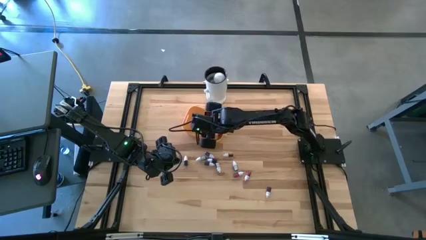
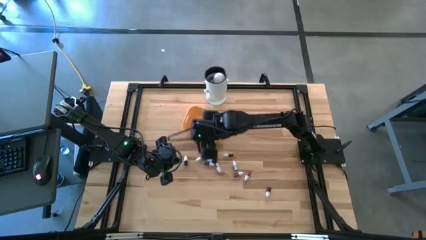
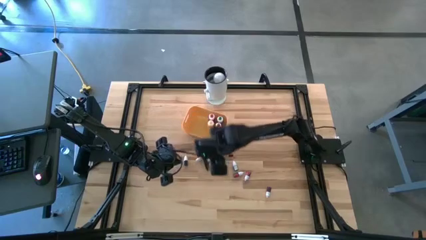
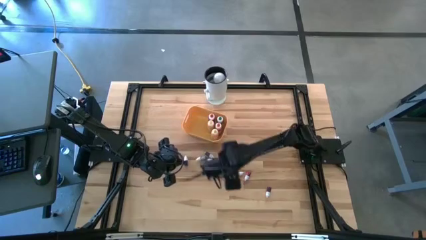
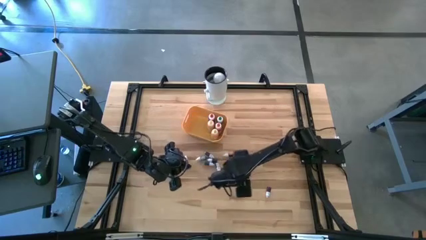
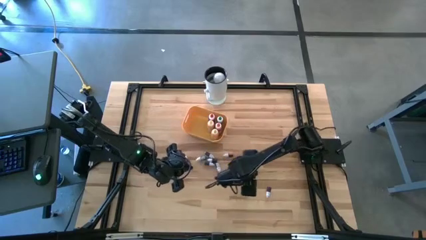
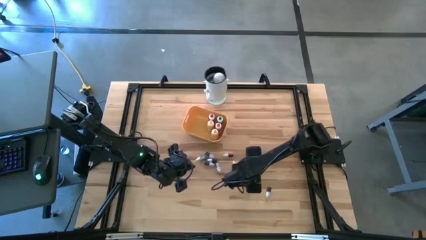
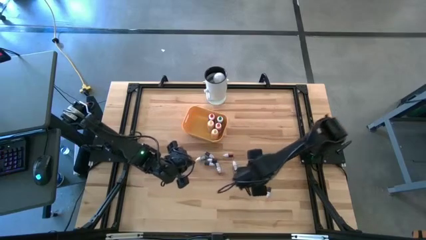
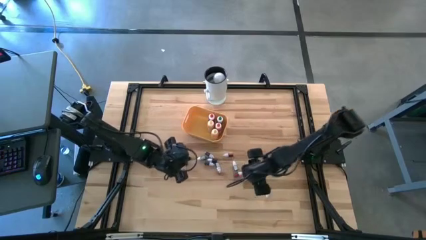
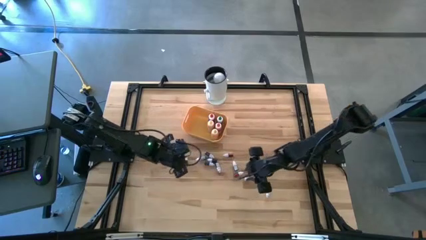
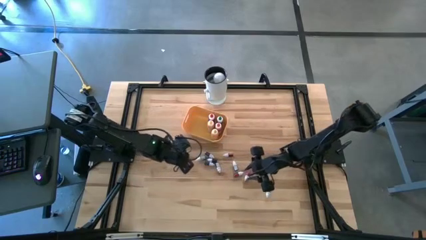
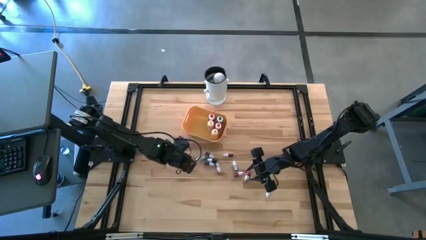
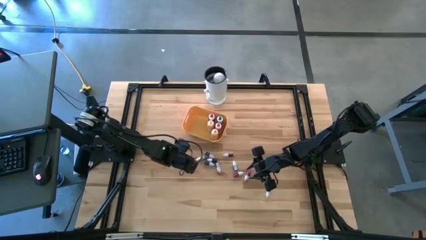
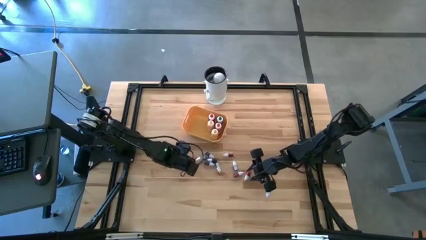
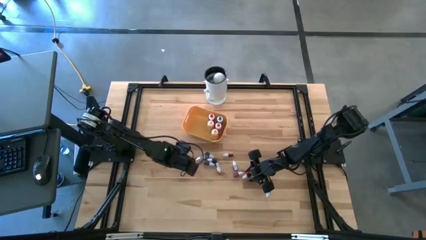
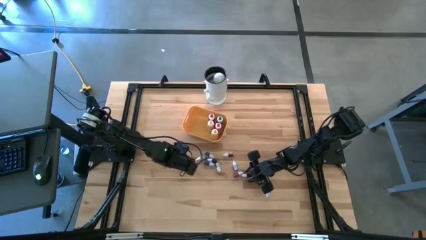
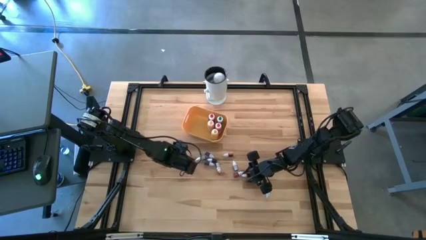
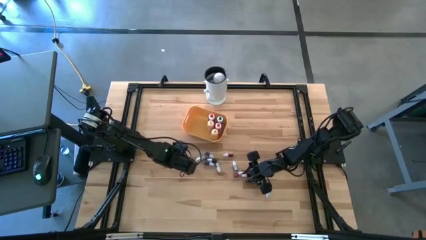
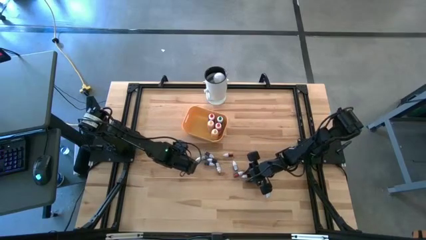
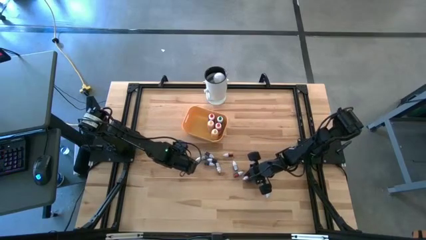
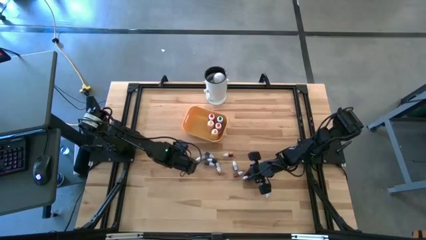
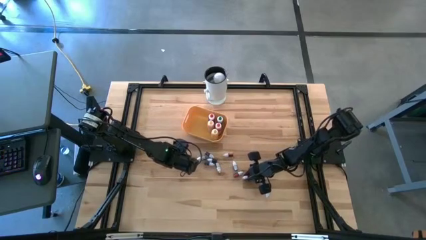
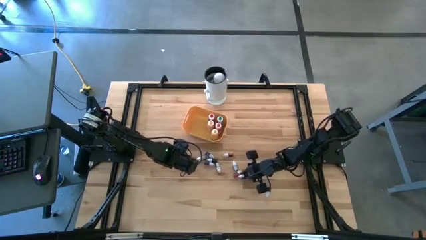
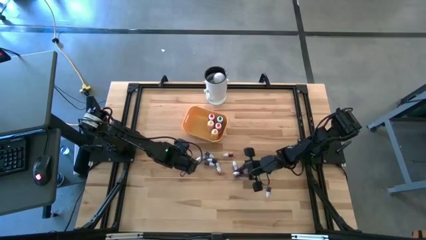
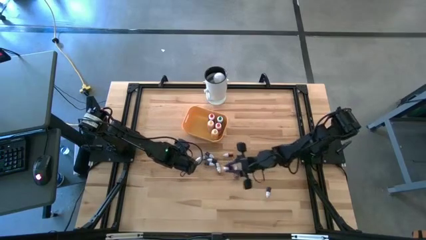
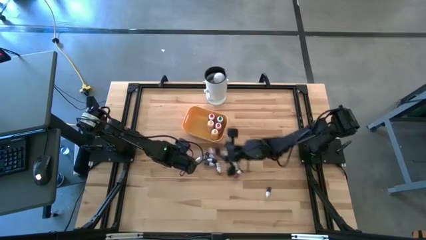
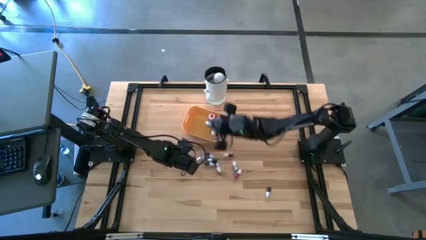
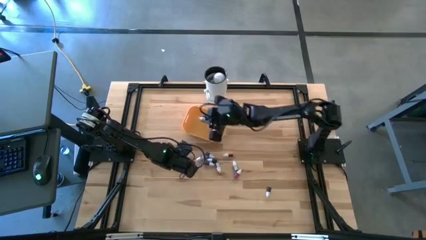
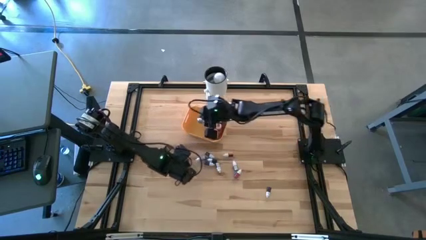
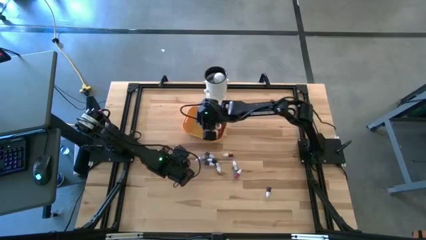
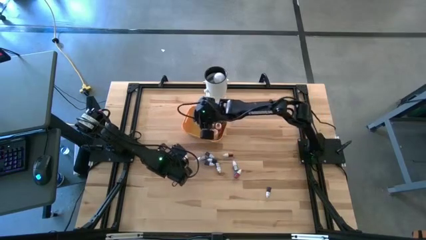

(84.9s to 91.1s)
Task: Pick & Place food coloring
Put the small red food coloring bottle into the yellow bin

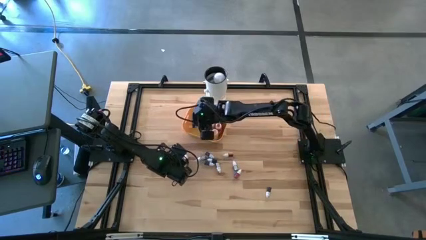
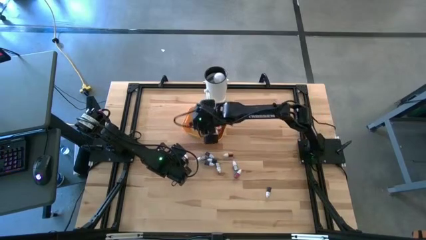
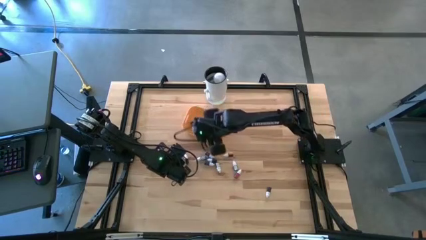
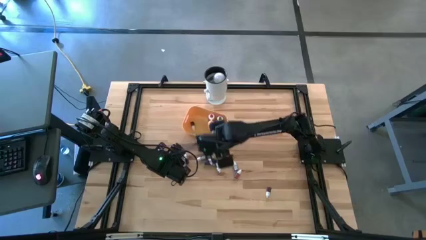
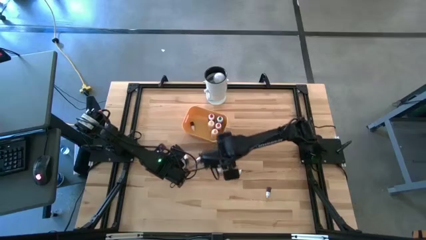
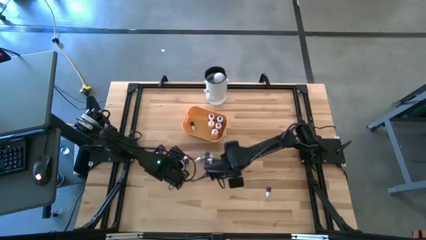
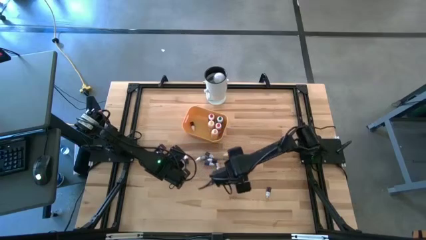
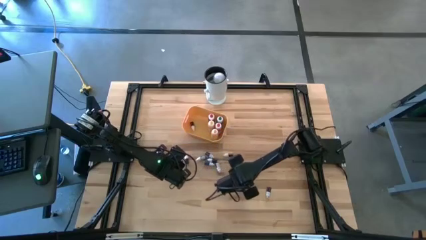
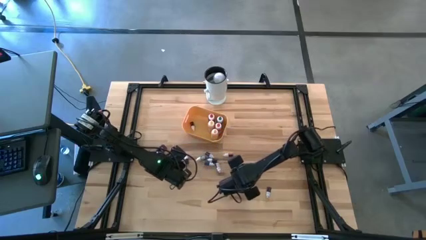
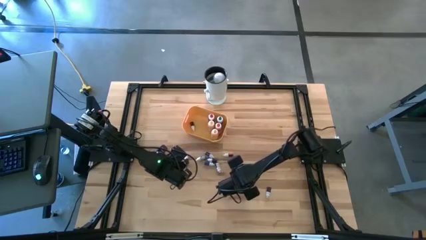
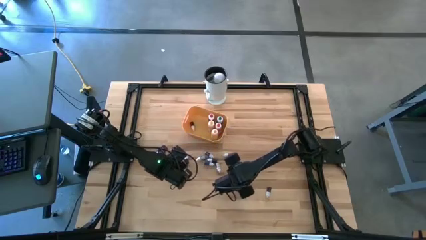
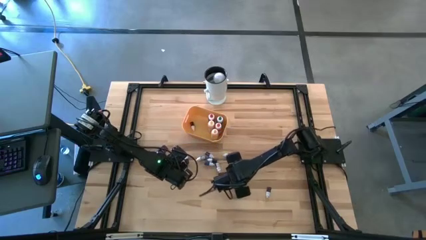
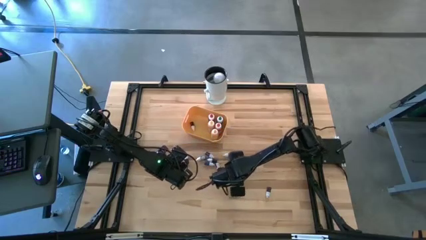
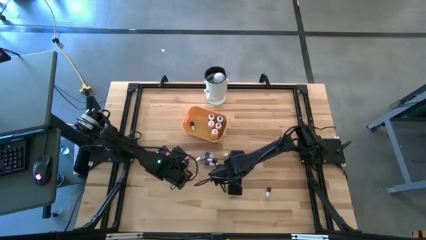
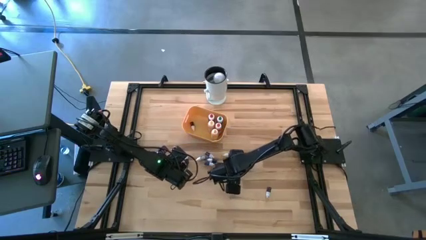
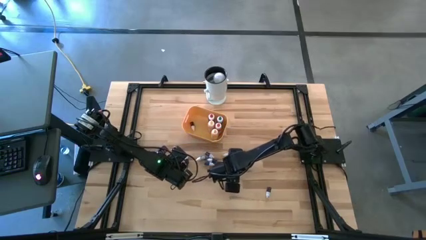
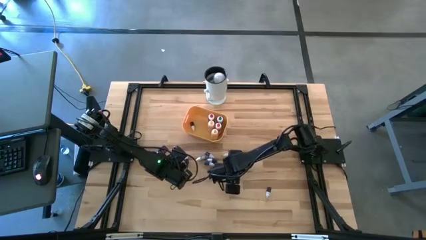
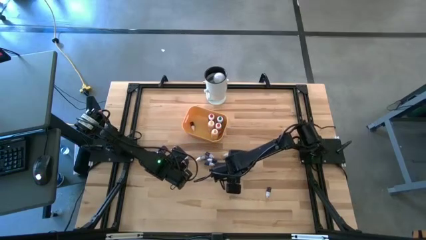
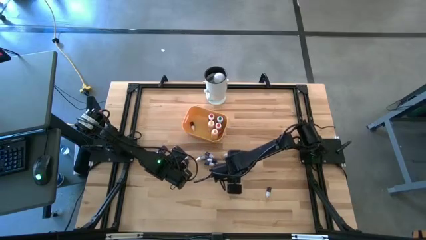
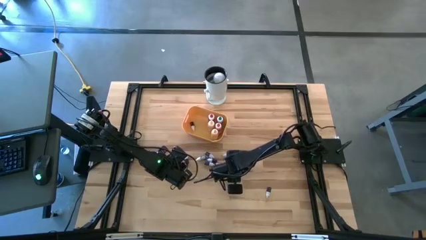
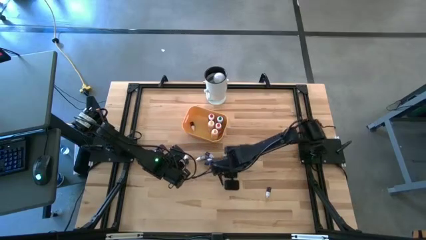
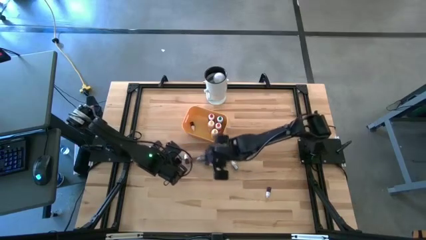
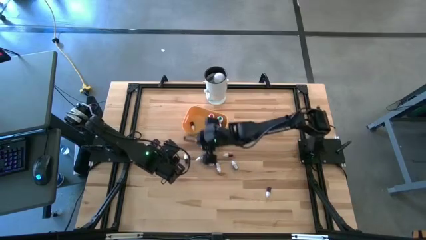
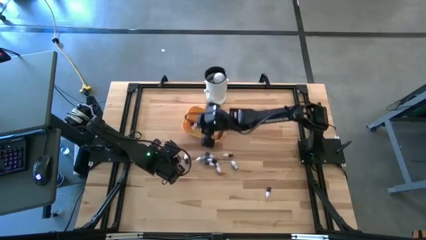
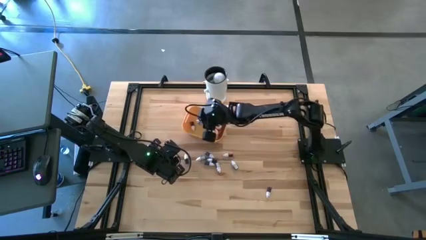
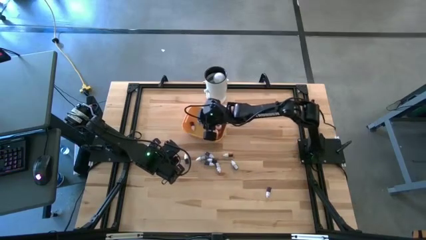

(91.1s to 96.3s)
Put the orange food coloring bottle into the yellow bin

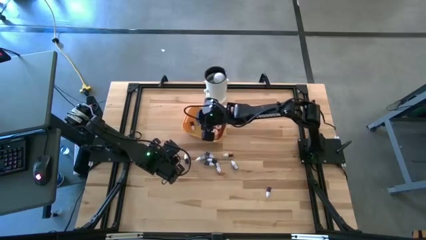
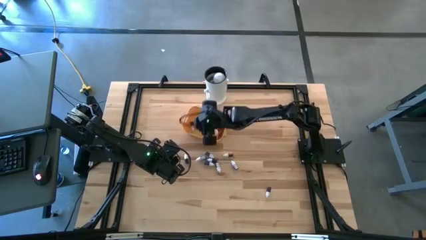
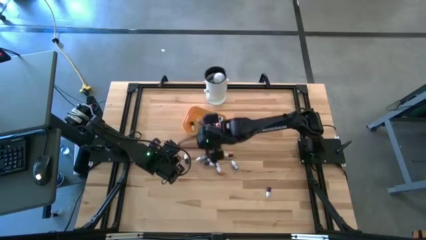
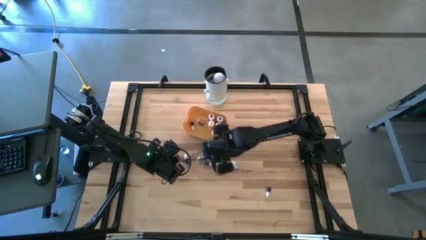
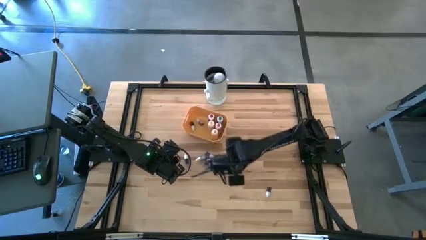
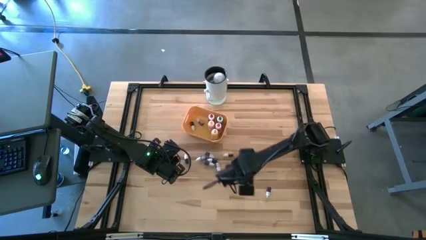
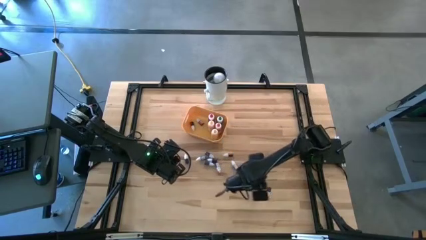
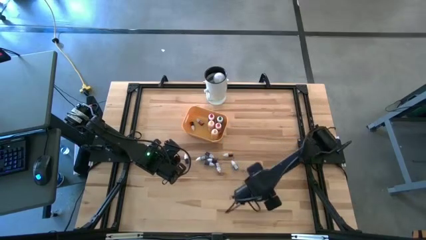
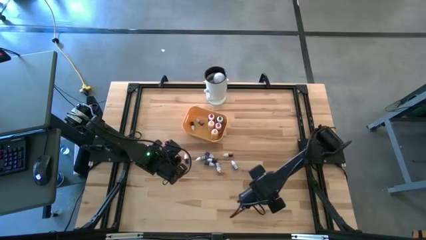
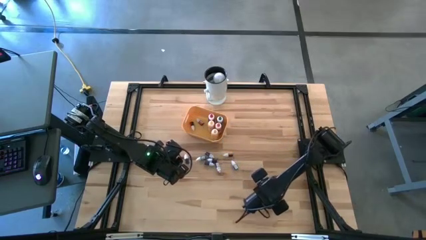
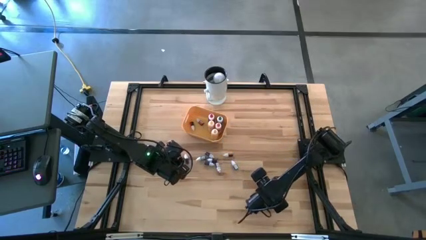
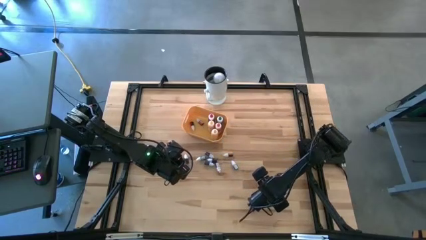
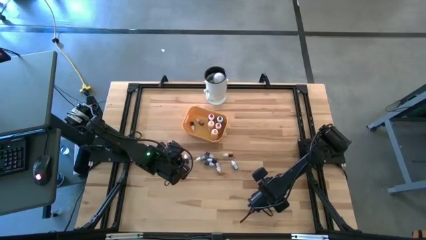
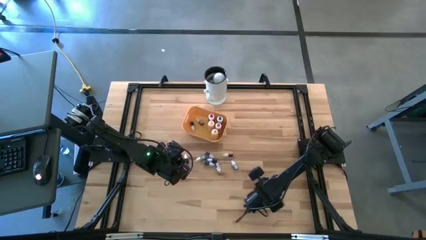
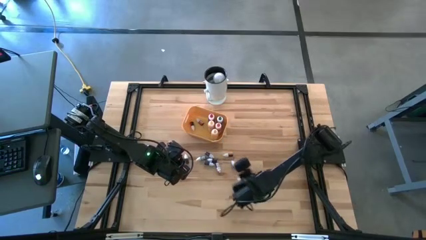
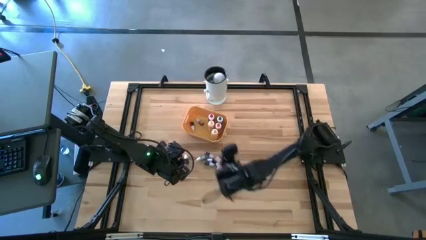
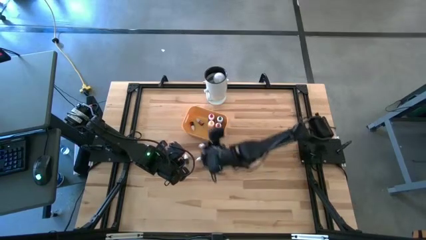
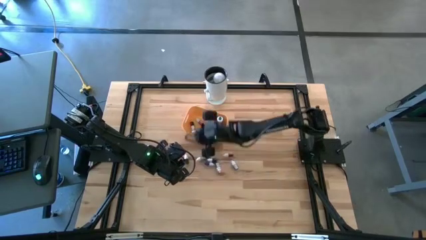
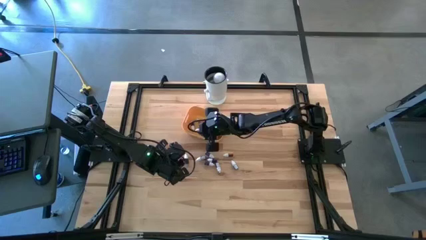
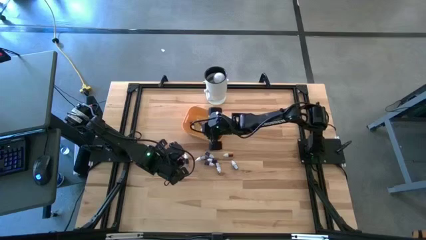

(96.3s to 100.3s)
Put the small black food coloring bottle into the yellow bin

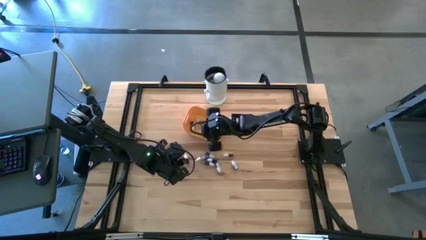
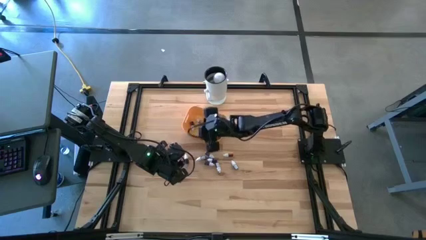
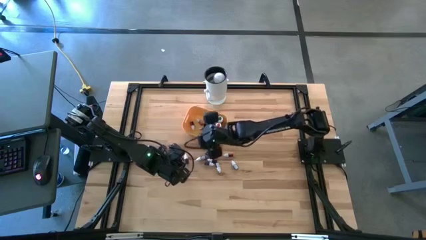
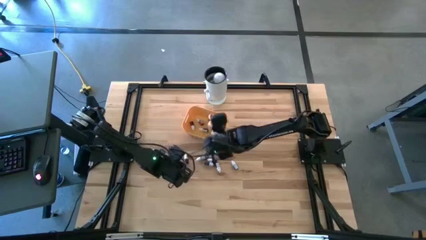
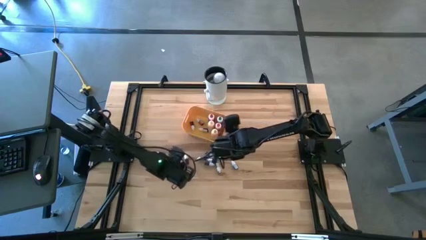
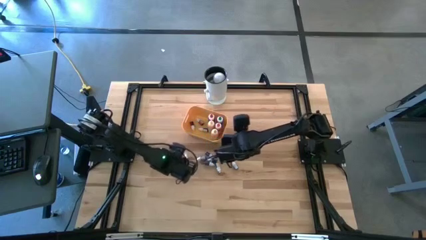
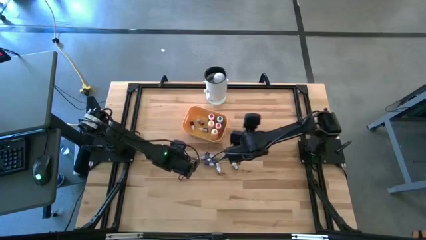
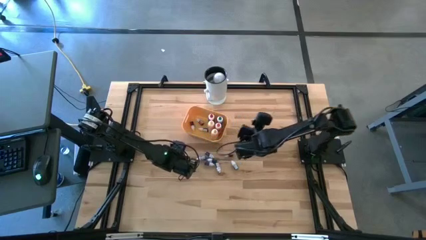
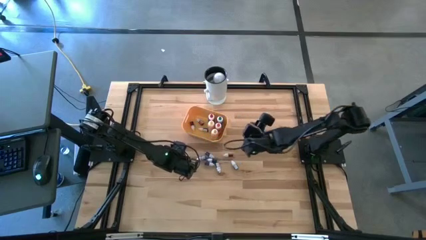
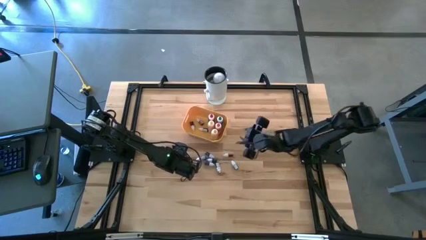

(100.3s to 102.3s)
Put the small black food coloring bottle into the yellow bin
